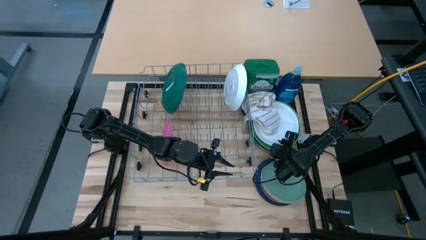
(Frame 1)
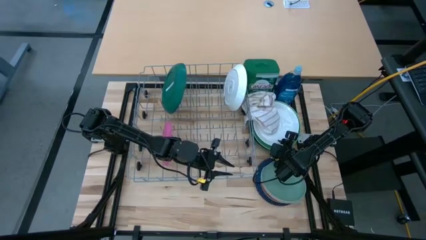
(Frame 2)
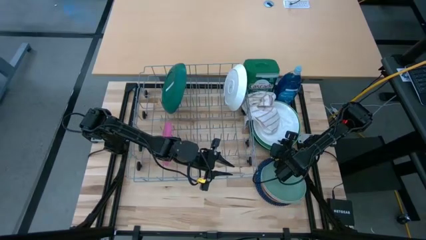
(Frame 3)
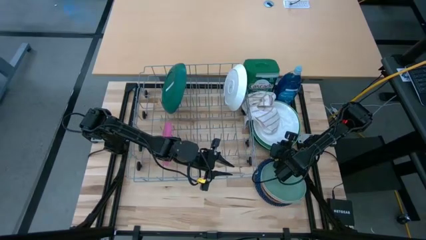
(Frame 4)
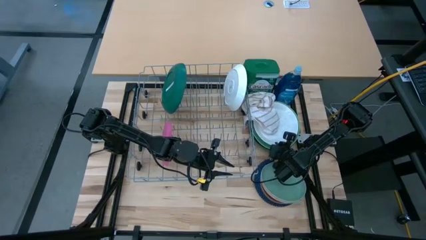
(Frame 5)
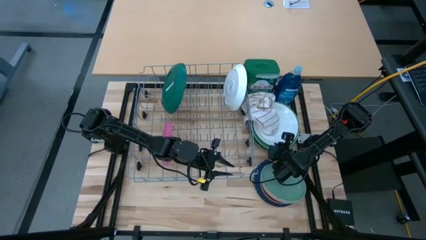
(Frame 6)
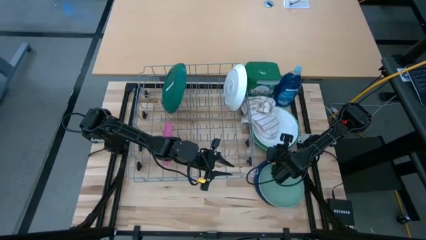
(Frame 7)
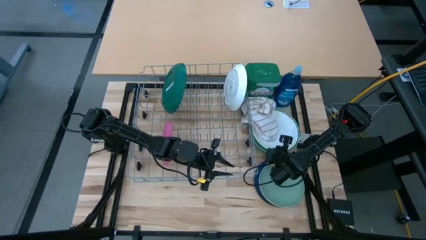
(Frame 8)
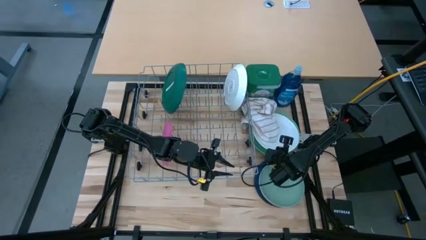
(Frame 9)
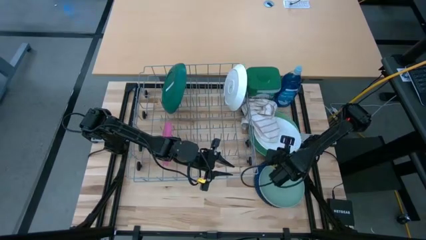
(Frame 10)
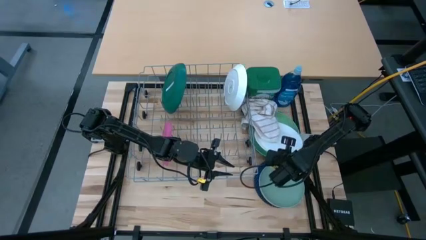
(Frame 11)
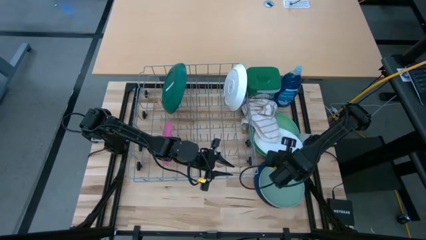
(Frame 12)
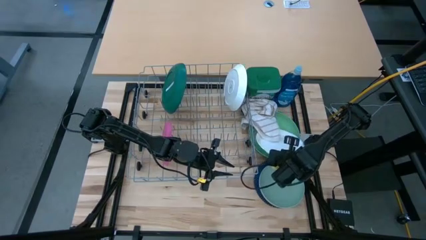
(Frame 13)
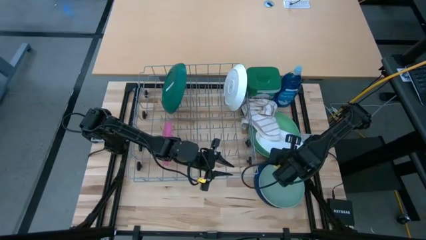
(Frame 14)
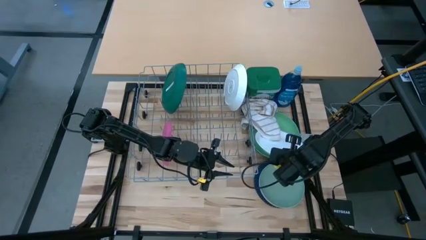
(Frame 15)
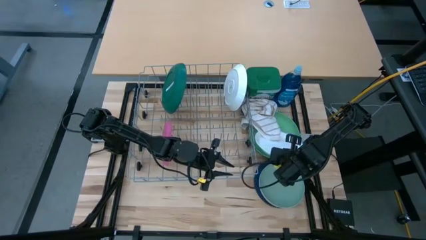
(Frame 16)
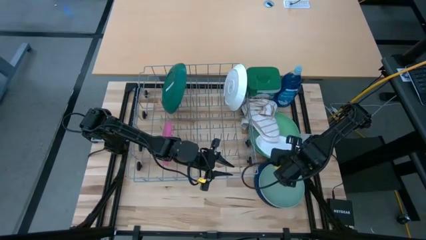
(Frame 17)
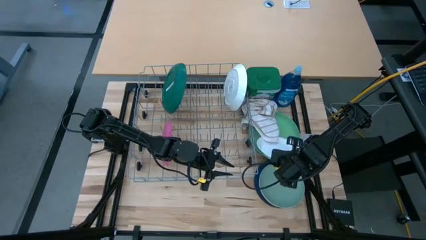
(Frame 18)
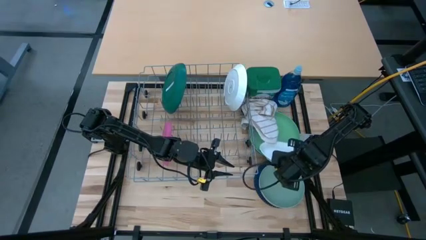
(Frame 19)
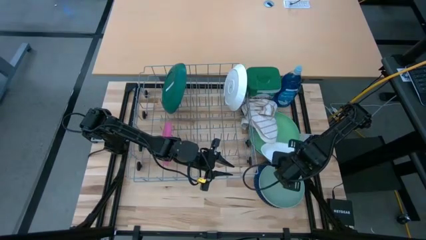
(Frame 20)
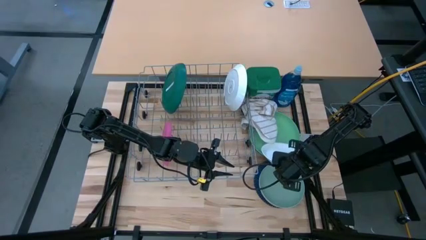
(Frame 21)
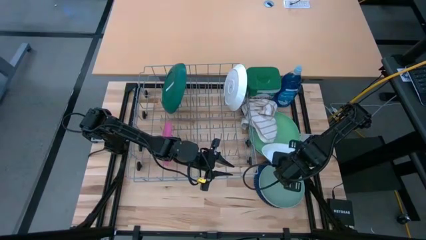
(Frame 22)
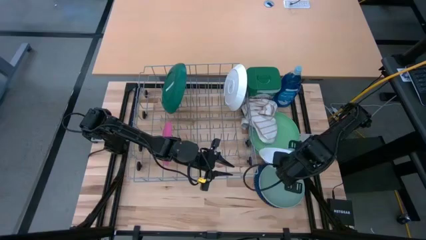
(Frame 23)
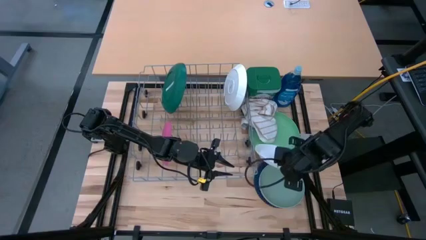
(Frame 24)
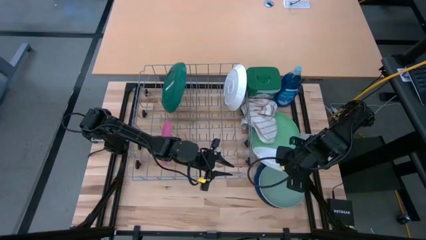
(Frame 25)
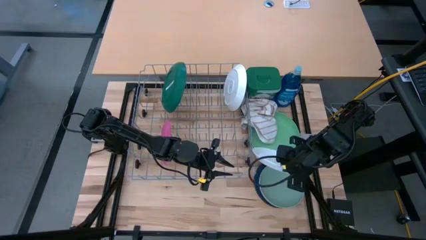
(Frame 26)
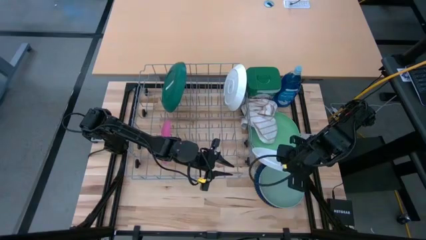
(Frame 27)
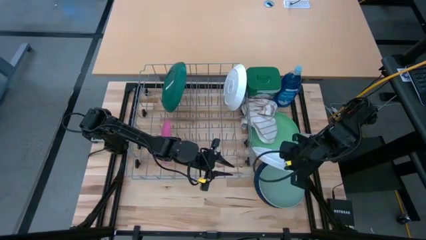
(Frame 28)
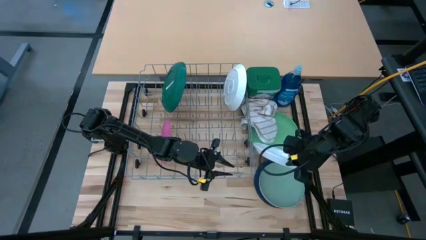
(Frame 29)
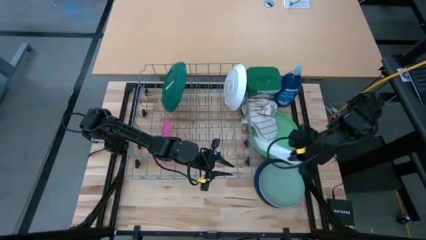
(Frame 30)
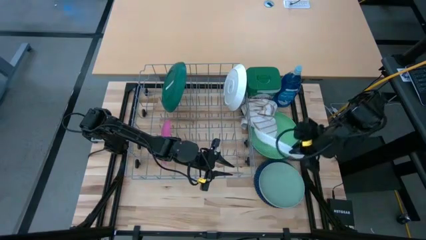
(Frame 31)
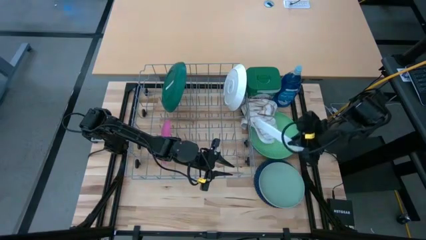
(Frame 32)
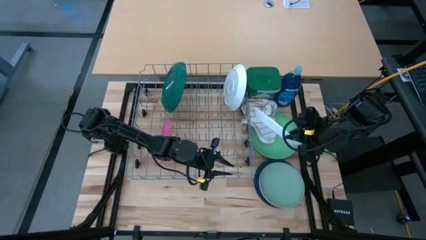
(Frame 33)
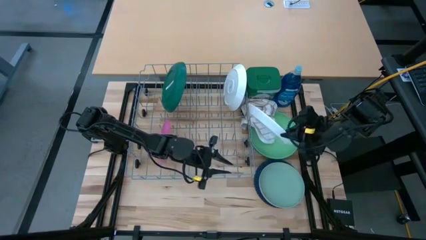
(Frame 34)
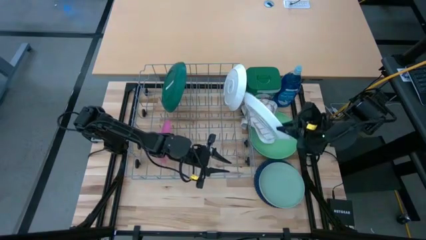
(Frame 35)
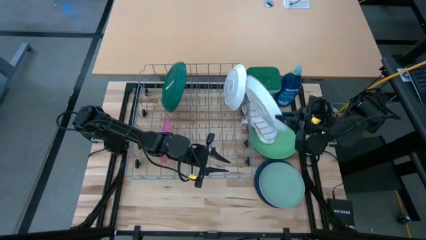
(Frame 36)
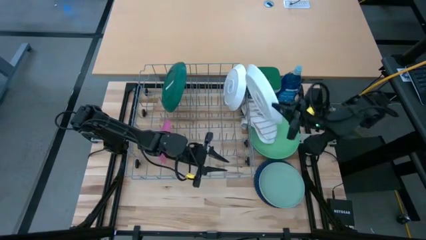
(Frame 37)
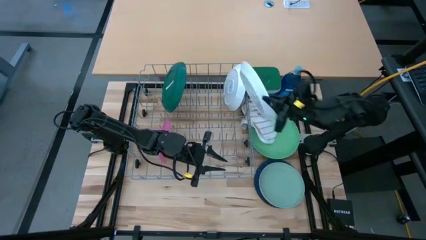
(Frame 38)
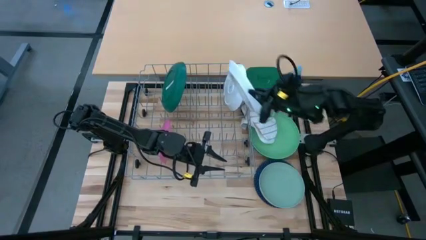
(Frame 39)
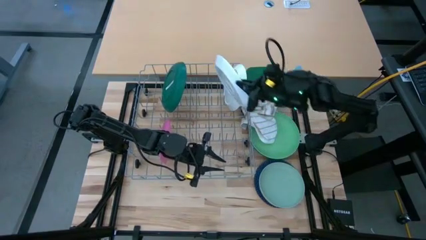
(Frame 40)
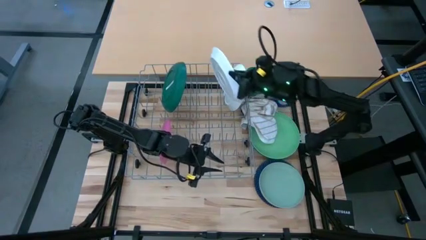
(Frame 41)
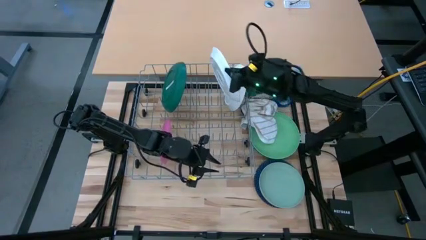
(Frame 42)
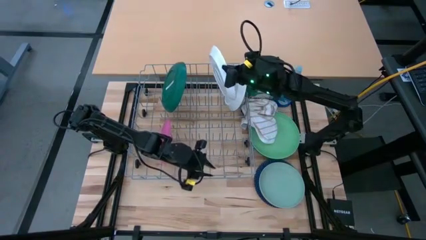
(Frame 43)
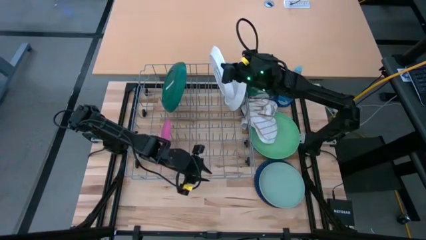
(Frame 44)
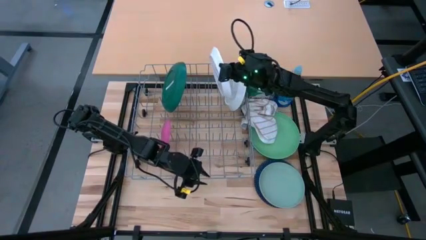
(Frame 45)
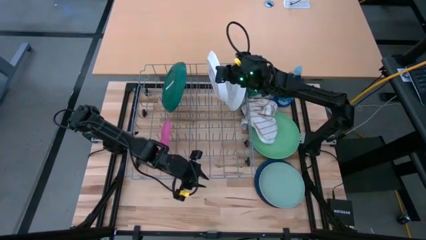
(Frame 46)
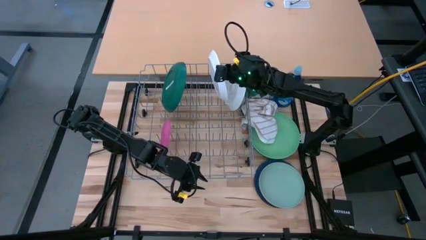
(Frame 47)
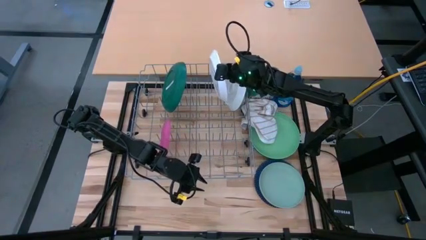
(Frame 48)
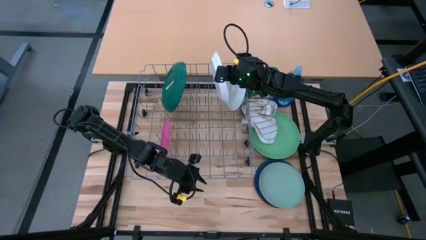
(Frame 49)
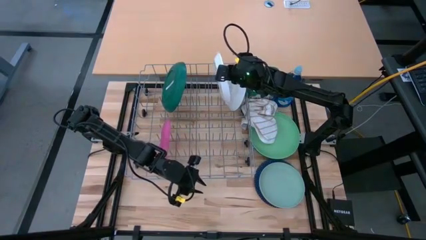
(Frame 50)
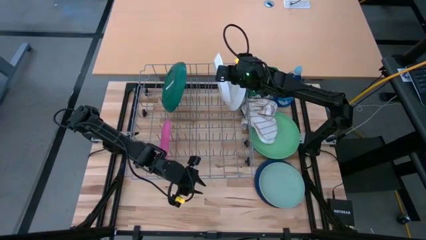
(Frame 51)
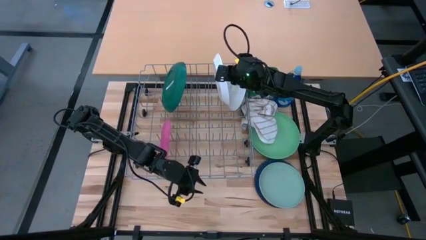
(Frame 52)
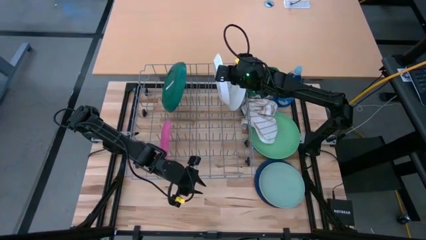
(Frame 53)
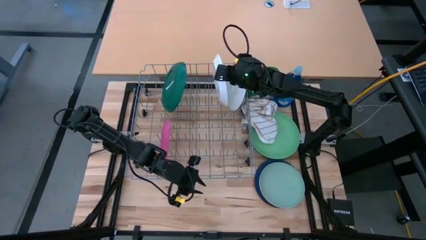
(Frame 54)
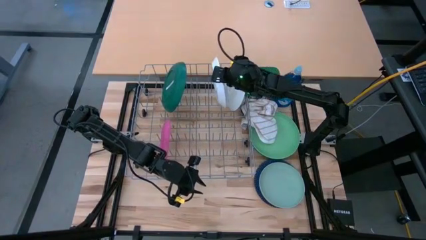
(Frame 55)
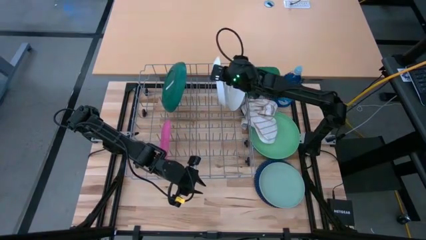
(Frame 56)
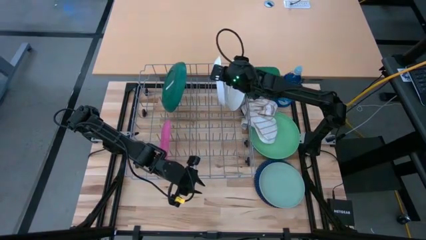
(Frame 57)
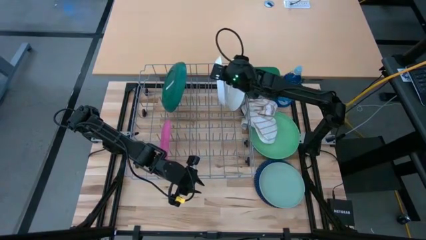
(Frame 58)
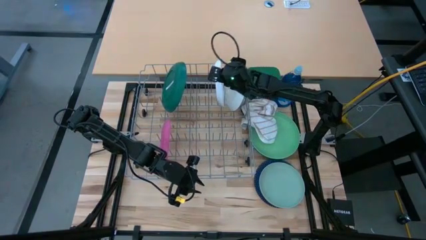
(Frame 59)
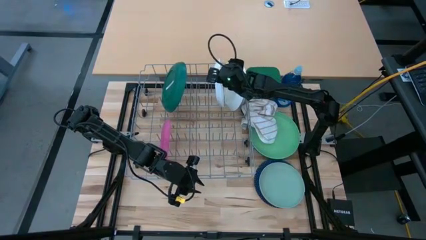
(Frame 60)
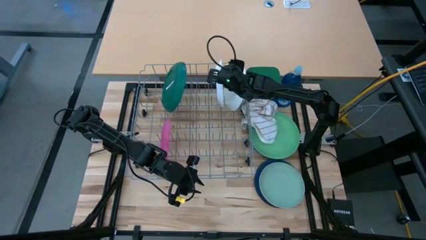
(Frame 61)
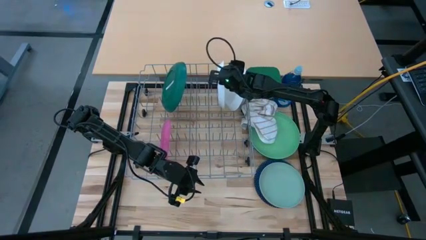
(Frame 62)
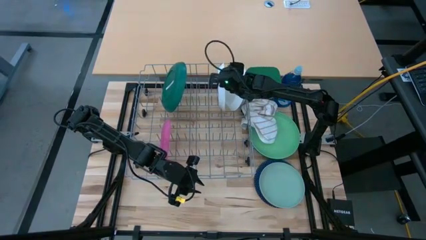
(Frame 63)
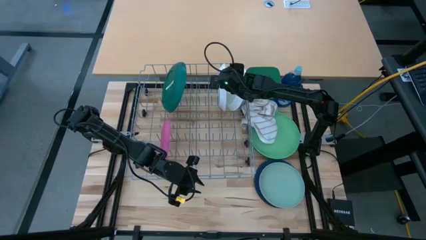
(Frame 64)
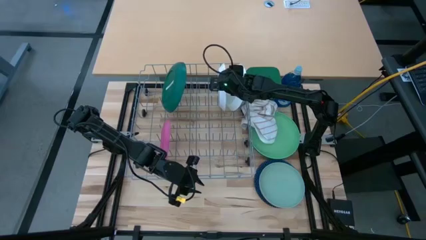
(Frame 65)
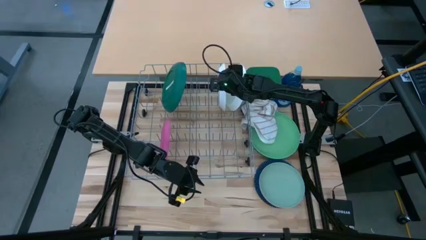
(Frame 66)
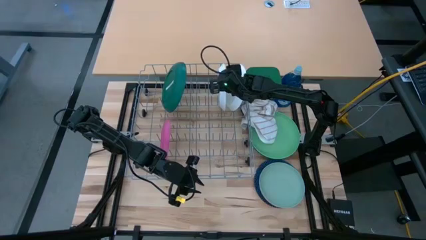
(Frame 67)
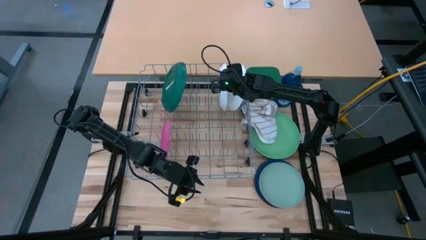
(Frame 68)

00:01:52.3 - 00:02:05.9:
Task: Sort dishes
Put the white plate in the dish rack
